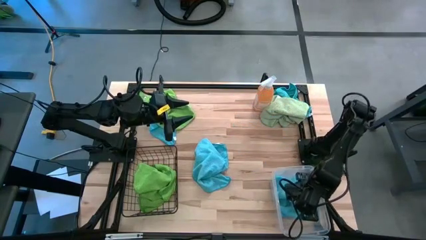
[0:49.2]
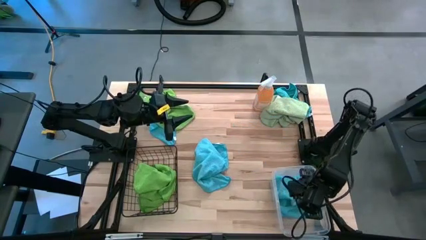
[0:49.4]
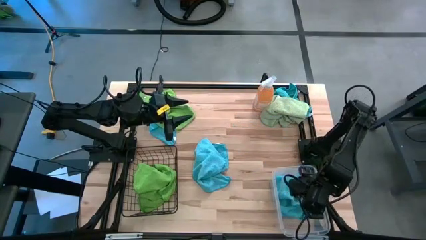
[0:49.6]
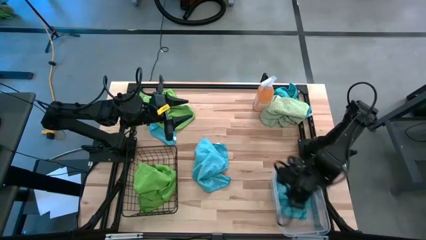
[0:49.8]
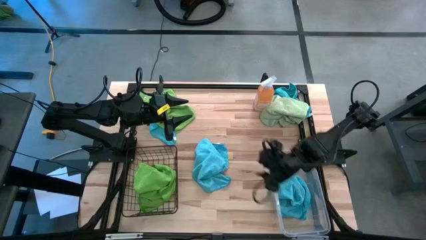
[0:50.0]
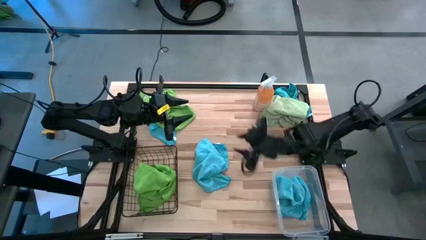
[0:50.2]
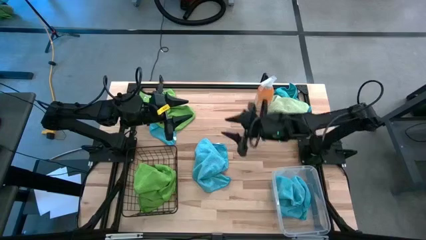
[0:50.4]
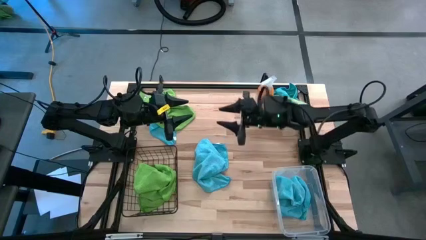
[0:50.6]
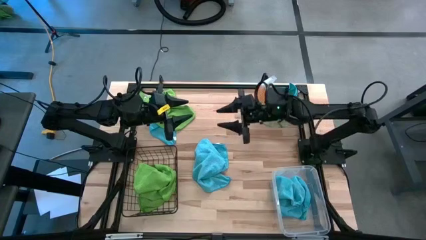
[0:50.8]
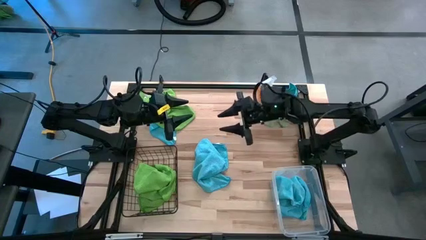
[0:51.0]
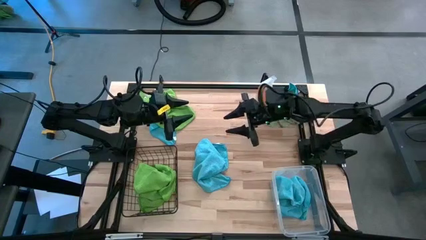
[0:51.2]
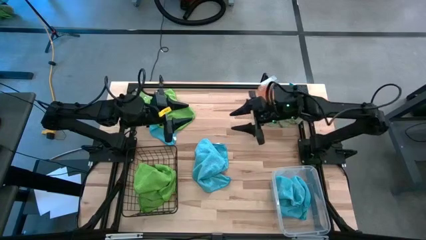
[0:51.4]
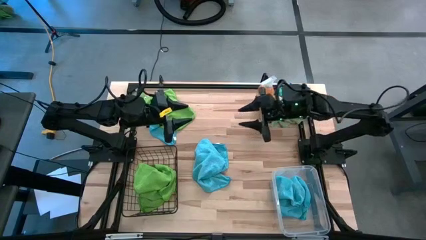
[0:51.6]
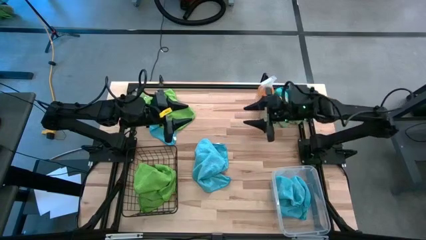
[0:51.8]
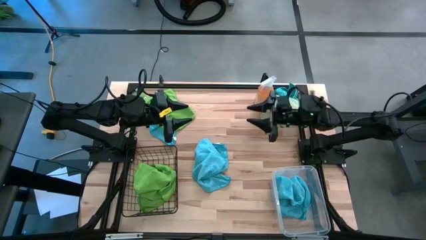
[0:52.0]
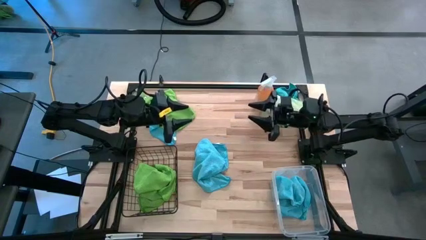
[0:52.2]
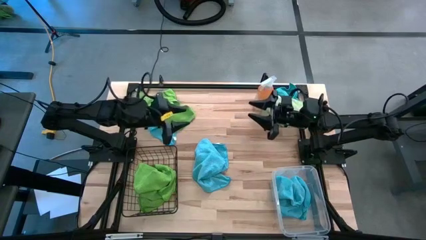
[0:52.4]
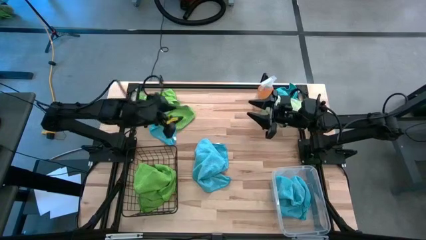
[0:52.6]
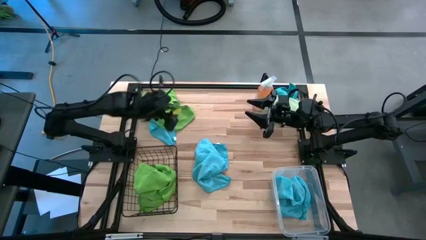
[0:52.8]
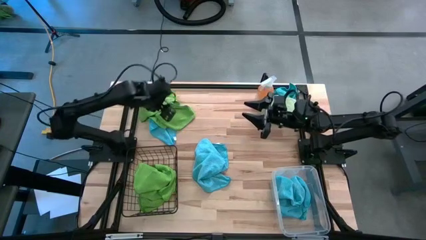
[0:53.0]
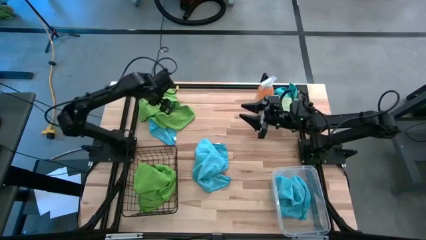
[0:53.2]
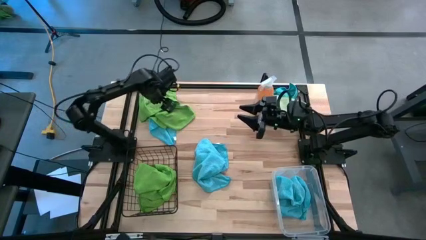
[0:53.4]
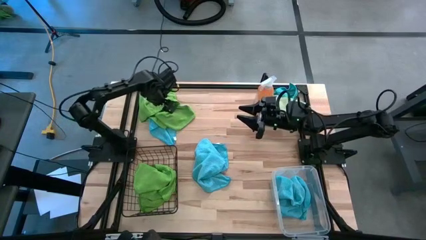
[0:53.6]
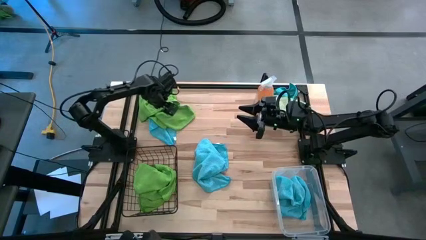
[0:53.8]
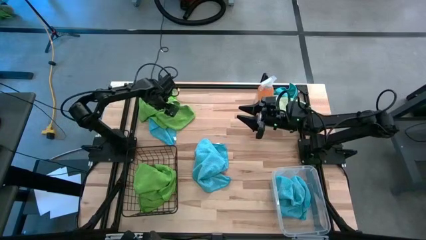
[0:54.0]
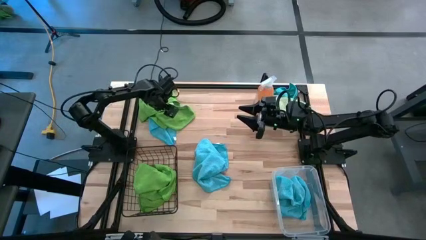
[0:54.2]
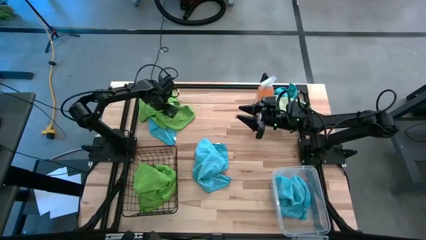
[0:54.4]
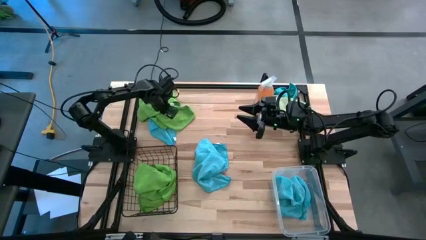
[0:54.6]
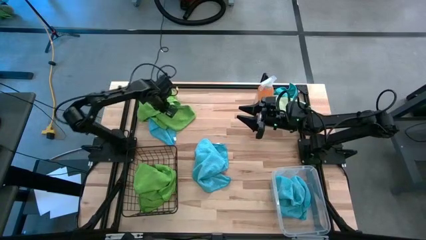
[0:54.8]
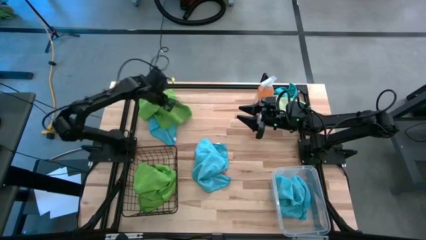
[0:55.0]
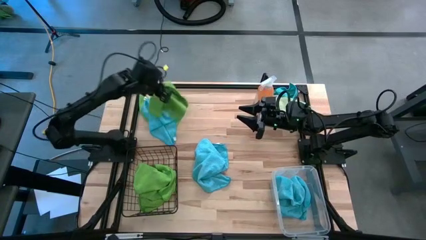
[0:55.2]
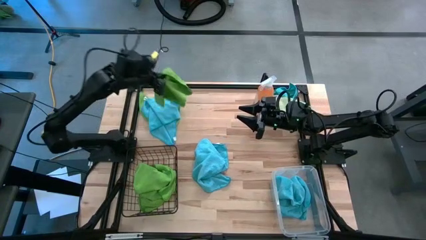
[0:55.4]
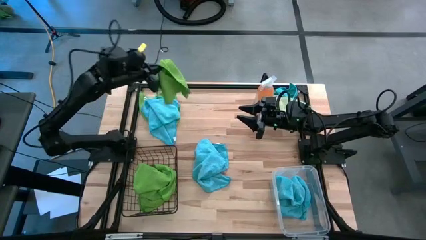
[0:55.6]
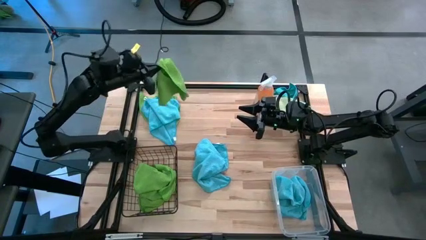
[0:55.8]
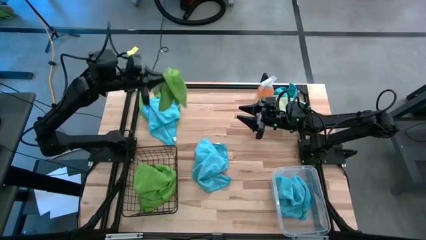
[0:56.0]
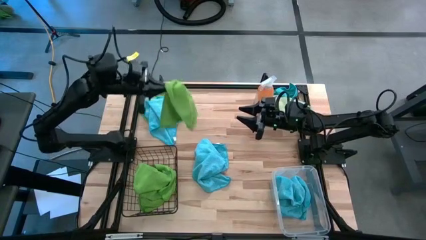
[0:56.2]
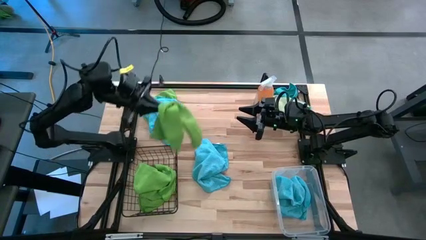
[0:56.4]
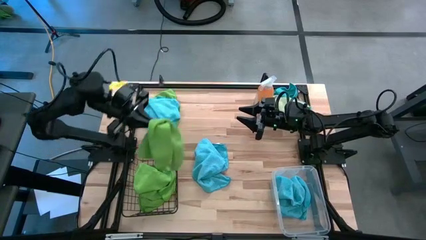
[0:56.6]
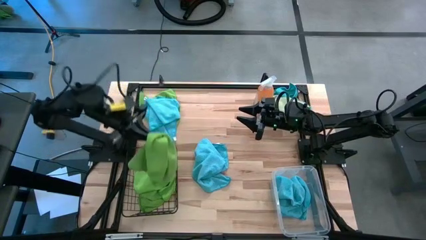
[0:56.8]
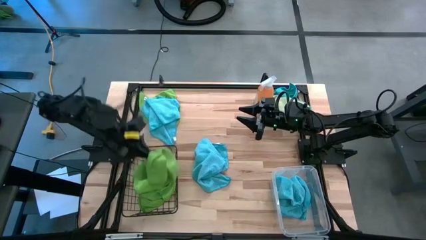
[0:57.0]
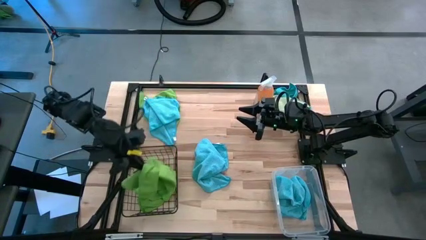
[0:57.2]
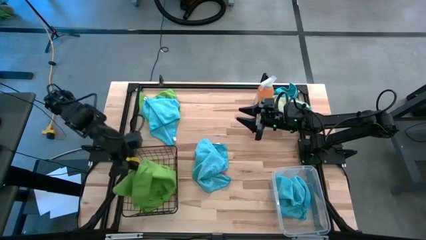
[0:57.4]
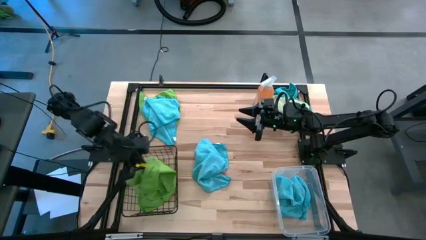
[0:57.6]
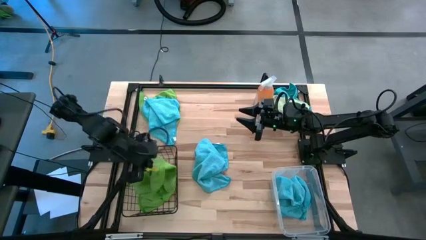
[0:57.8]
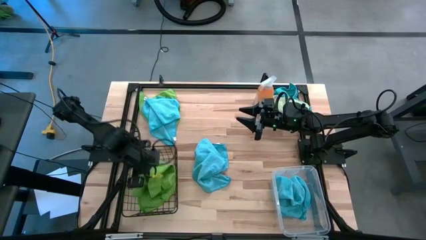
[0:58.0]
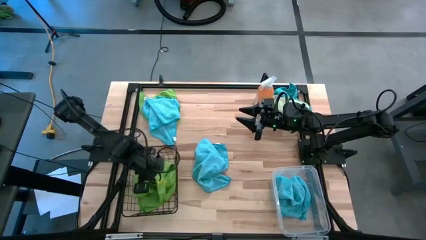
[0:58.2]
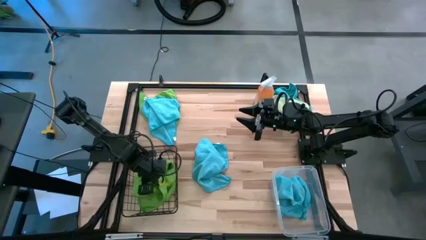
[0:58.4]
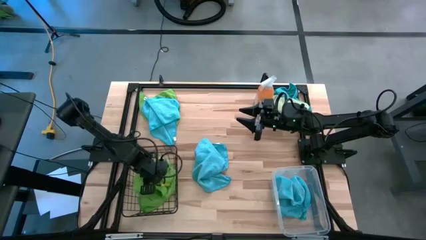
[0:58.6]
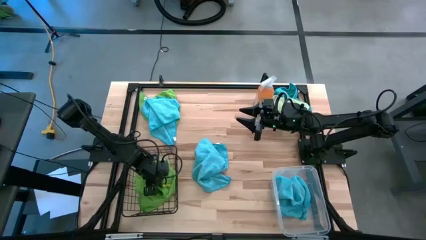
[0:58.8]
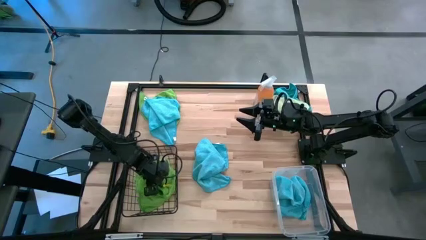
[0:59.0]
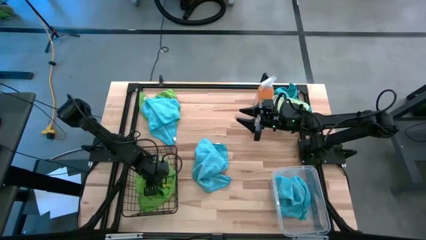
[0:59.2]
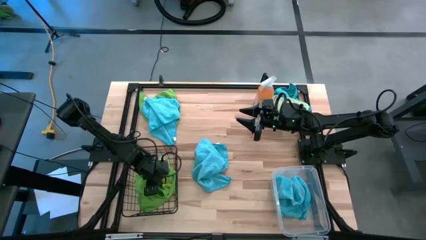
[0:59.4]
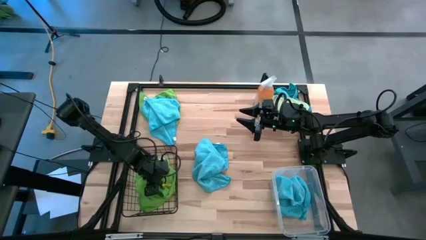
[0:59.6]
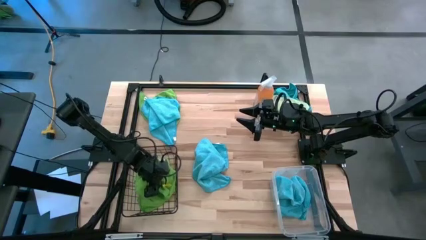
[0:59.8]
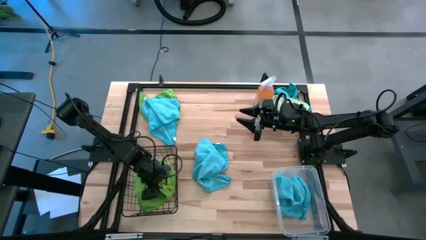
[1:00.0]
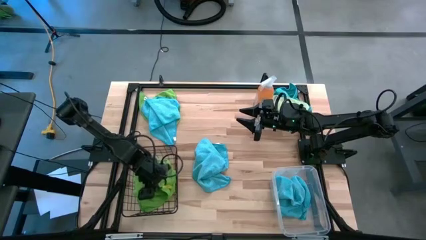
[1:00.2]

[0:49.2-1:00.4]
Task: Sort microfiber towel by color & place in baskets
Put the green microfiber cloth into the black wire basket
